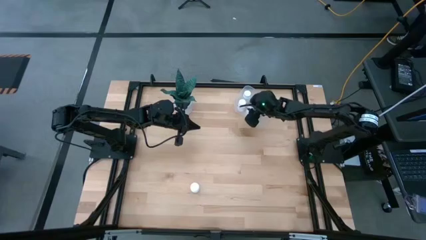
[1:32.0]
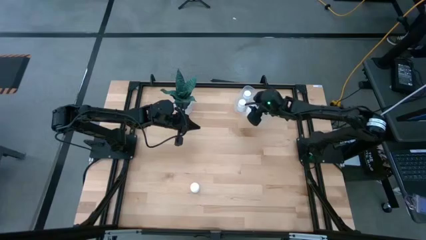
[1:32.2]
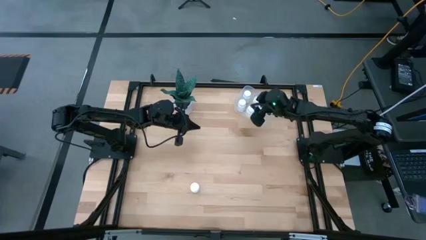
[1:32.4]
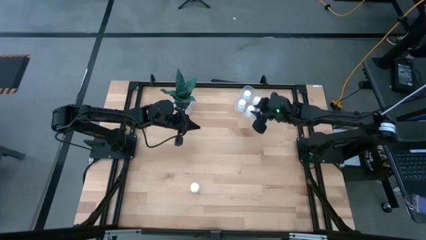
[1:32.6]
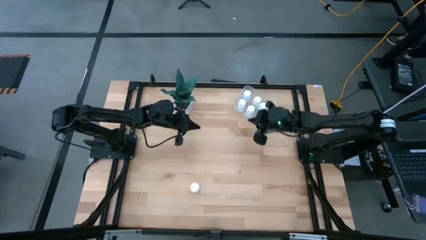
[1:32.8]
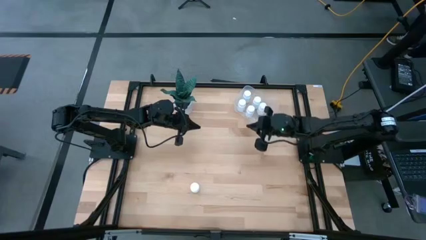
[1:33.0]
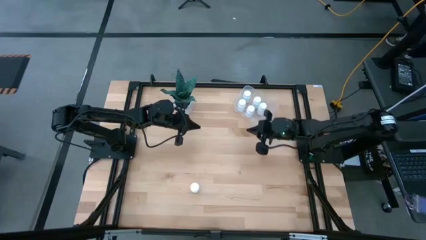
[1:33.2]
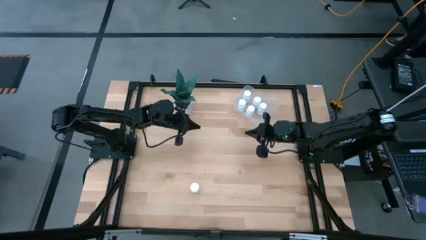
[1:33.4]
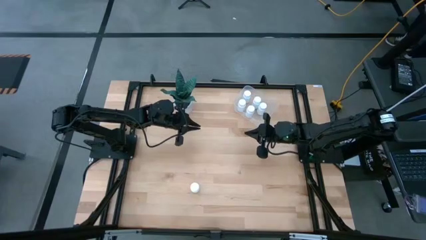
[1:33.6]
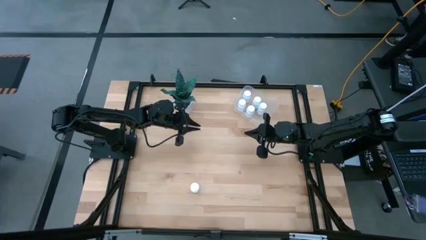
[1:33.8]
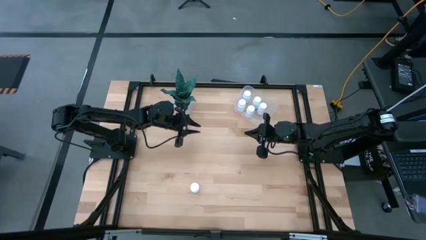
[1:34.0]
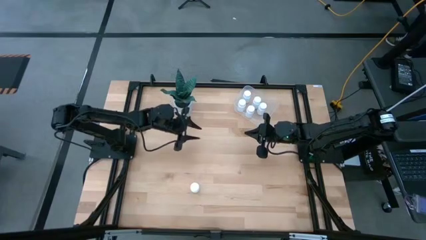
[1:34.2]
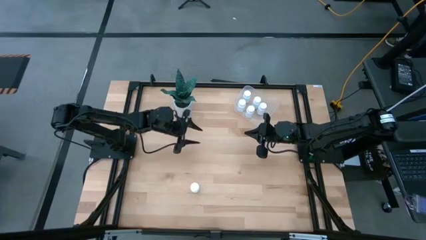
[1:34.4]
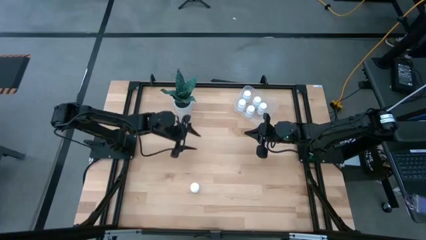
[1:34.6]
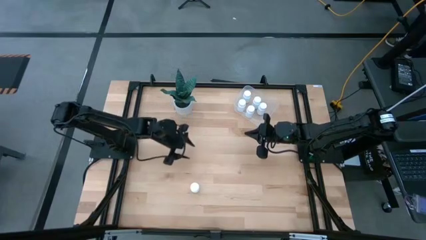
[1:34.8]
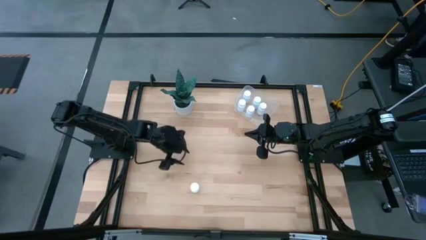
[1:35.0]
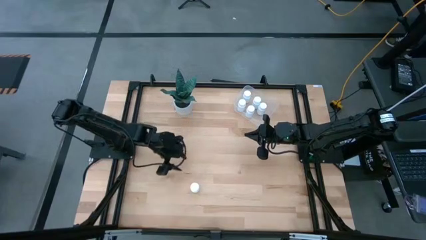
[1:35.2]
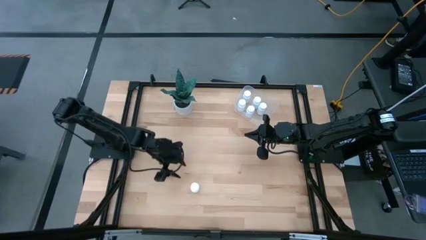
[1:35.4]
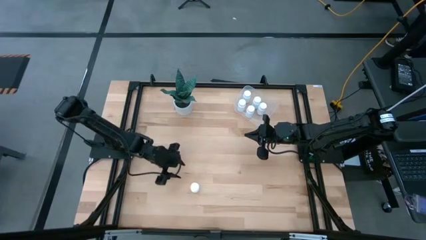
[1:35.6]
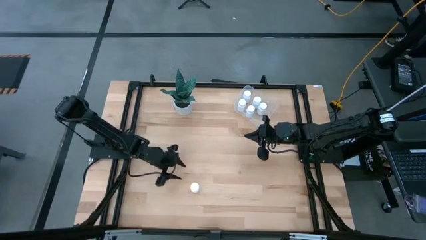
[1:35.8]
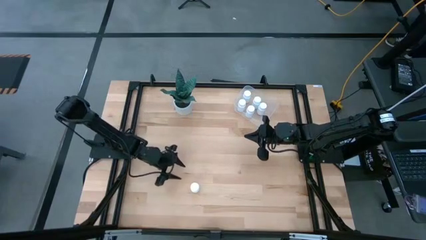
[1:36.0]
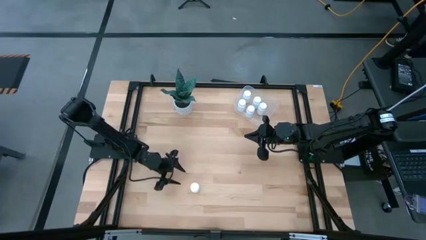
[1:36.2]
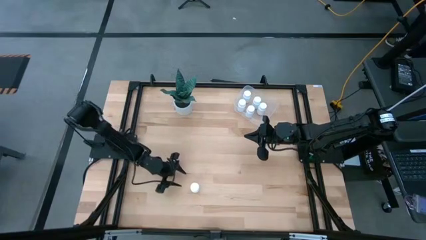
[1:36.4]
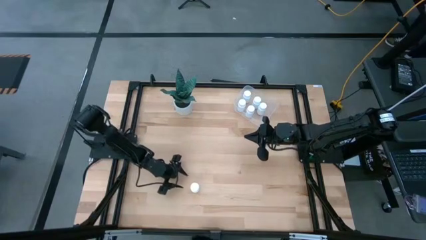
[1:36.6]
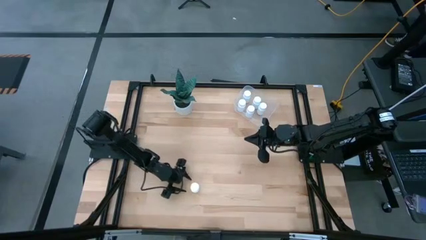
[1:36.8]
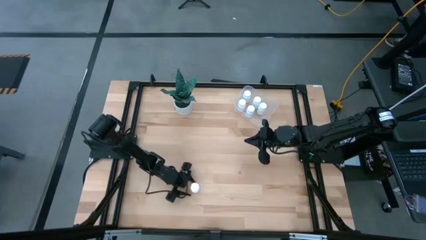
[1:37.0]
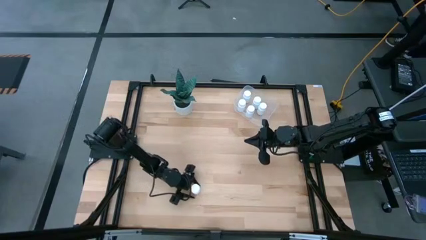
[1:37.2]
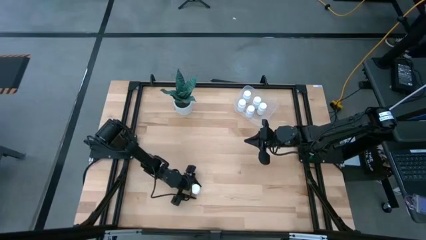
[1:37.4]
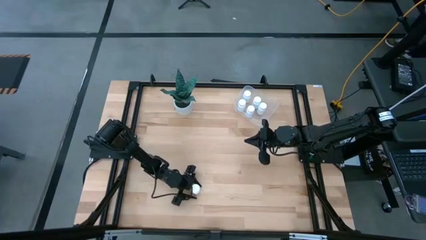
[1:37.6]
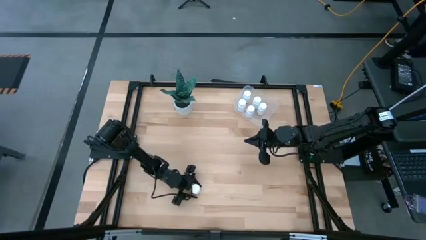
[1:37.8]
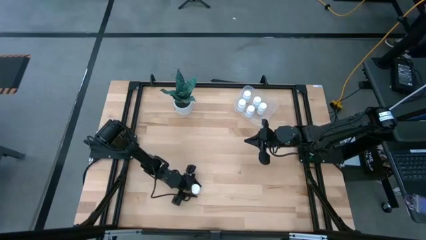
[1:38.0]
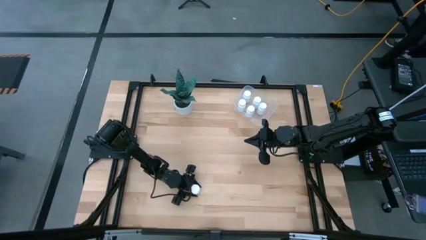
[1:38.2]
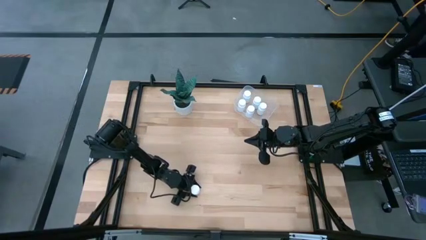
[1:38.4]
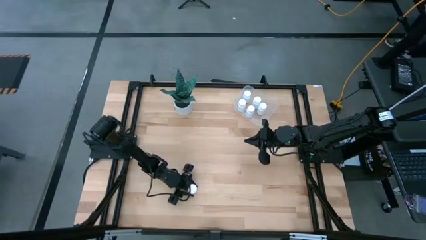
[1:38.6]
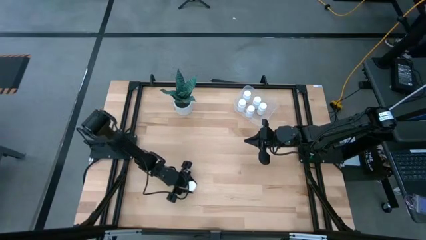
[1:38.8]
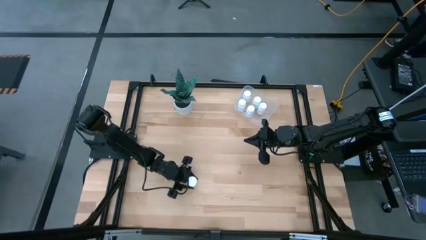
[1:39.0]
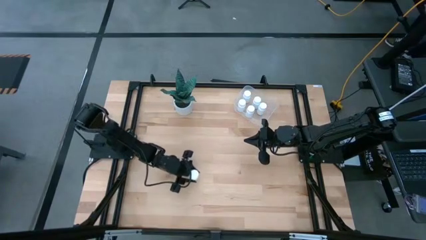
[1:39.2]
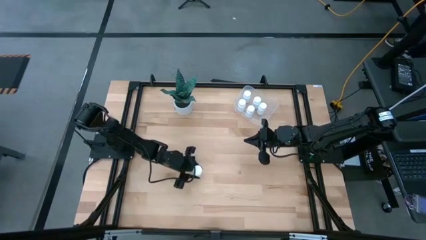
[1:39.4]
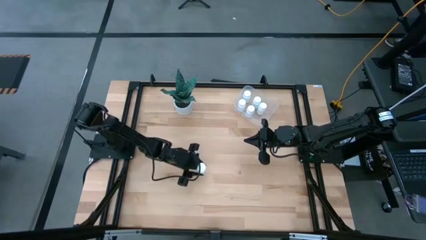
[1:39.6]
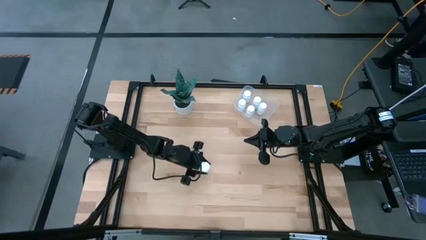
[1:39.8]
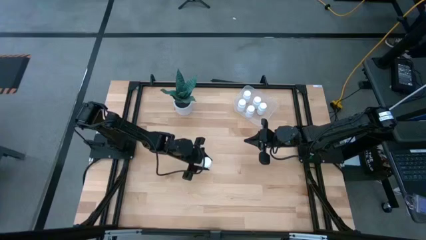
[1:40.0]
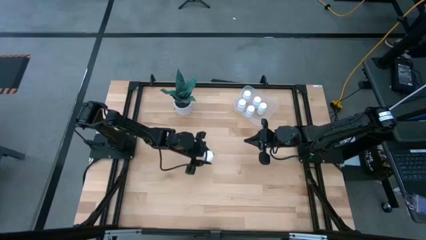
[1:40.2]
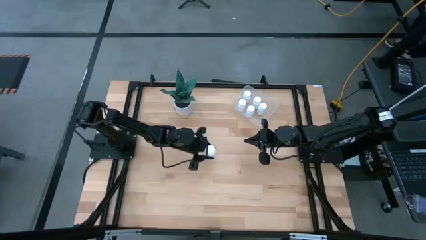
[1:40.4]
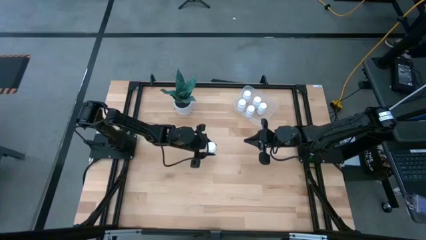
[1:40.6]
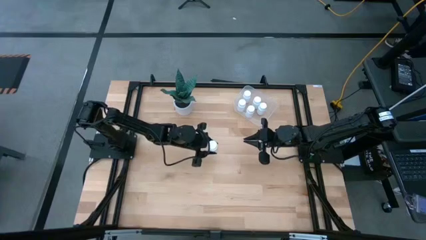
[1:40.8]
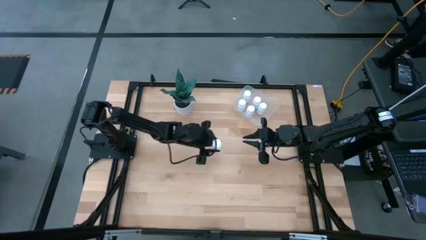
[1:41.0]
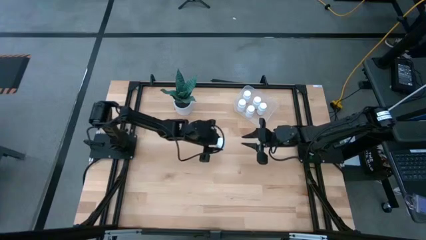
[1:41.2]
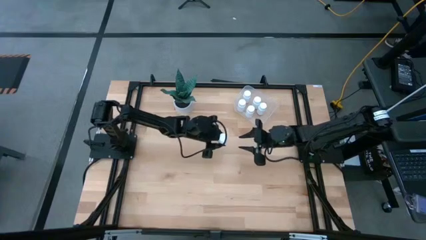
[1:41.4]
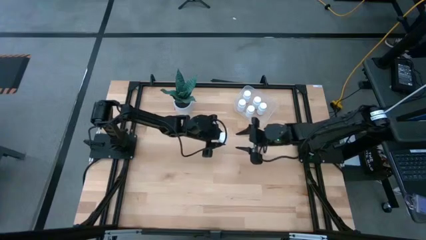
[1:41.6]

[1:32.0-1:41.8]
Task: Pick and place pill bottles into a basket
Put the white pill bottle into the transparent bin

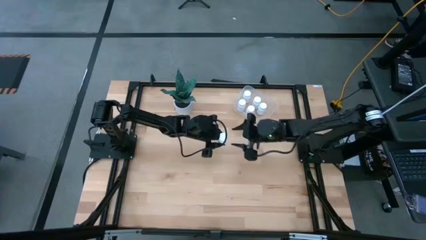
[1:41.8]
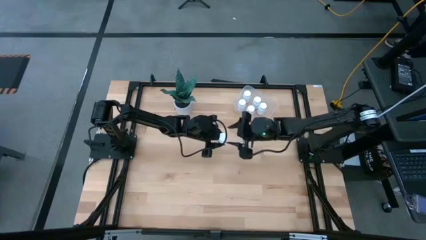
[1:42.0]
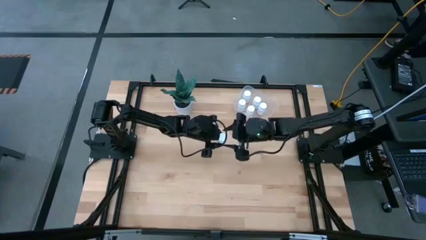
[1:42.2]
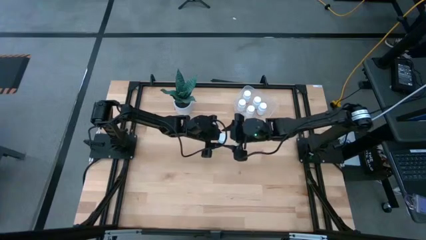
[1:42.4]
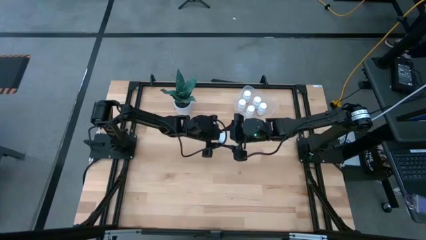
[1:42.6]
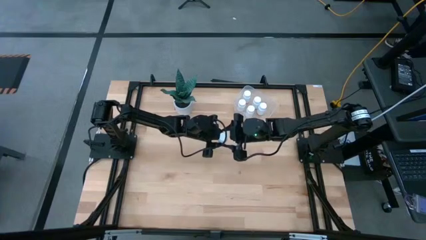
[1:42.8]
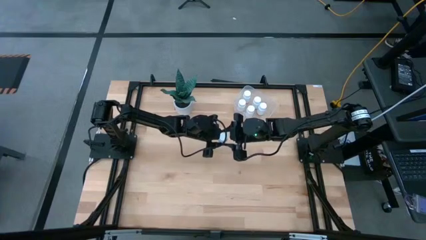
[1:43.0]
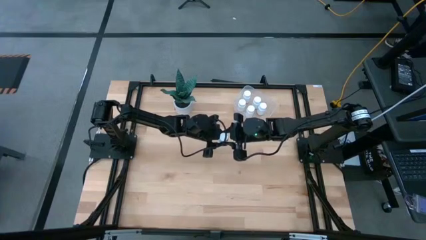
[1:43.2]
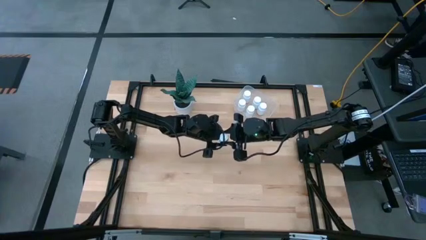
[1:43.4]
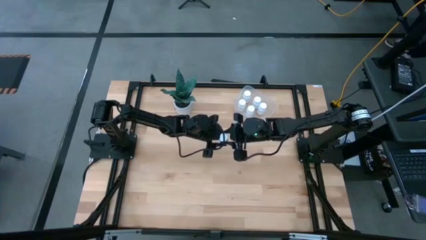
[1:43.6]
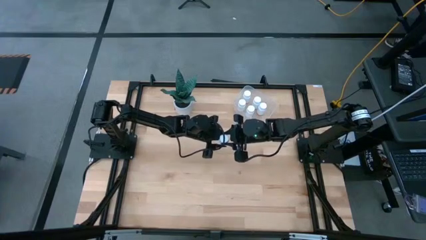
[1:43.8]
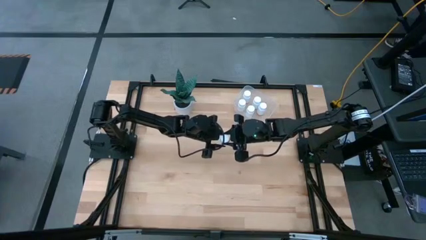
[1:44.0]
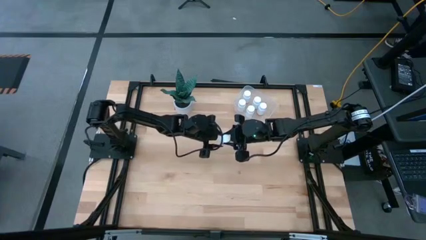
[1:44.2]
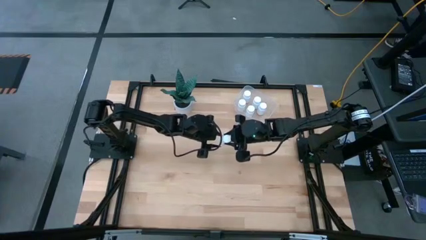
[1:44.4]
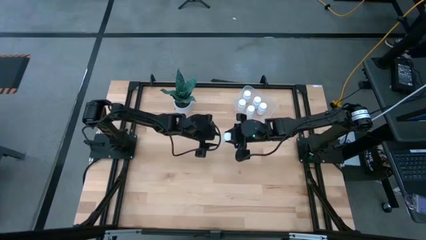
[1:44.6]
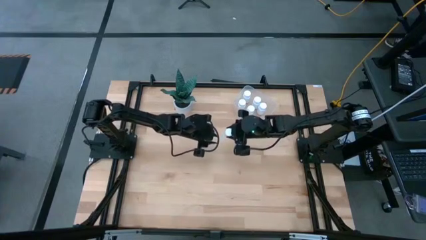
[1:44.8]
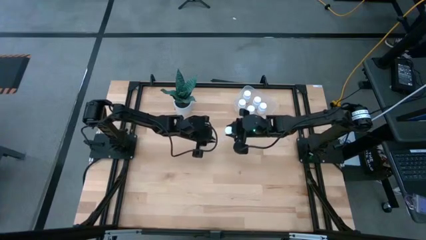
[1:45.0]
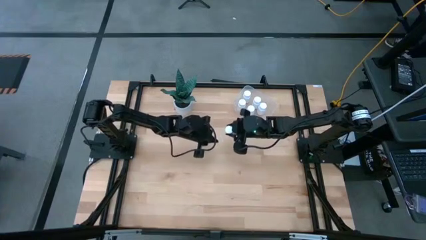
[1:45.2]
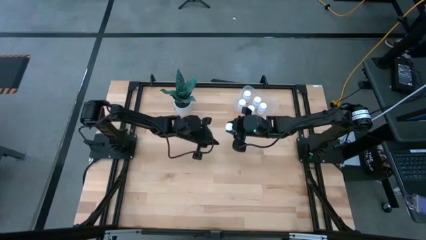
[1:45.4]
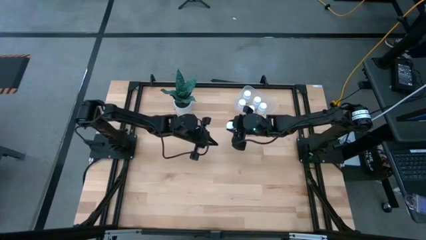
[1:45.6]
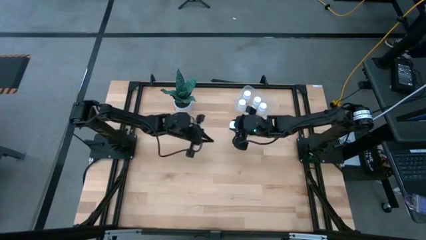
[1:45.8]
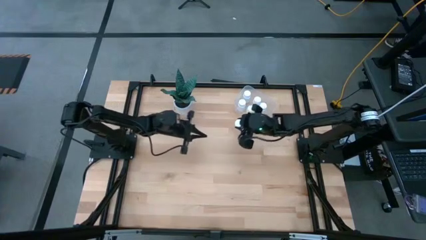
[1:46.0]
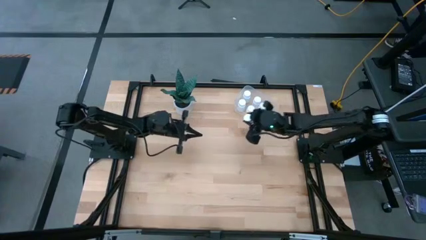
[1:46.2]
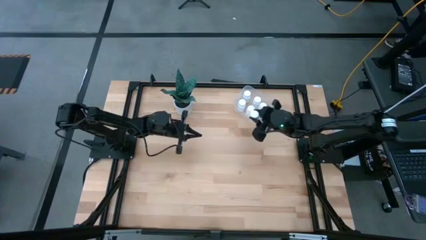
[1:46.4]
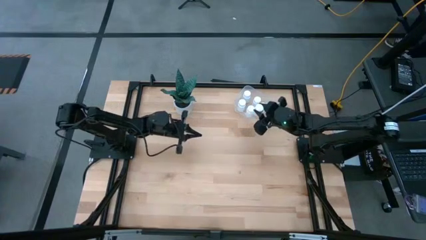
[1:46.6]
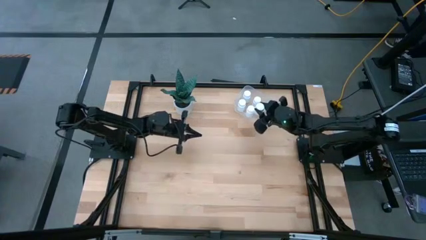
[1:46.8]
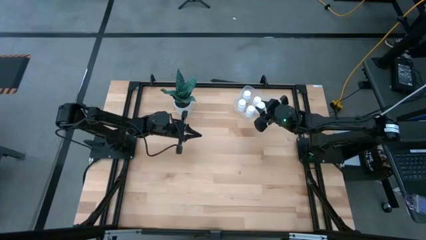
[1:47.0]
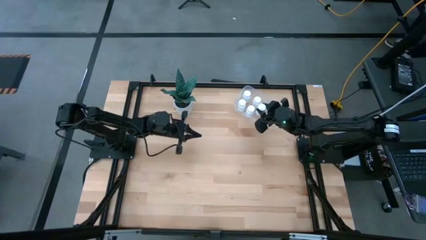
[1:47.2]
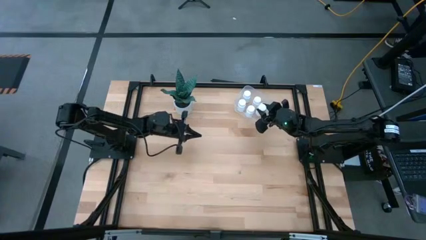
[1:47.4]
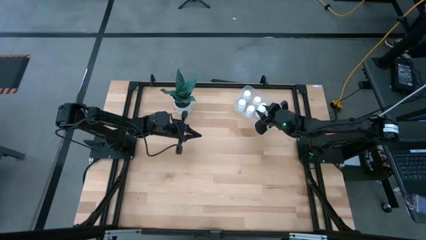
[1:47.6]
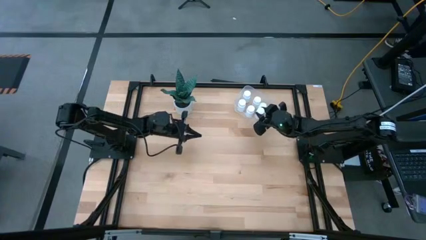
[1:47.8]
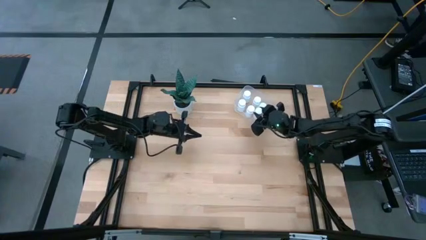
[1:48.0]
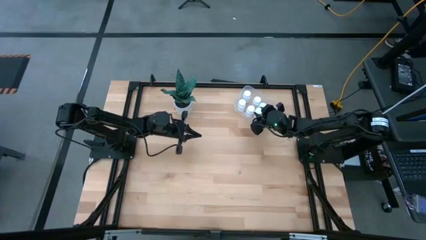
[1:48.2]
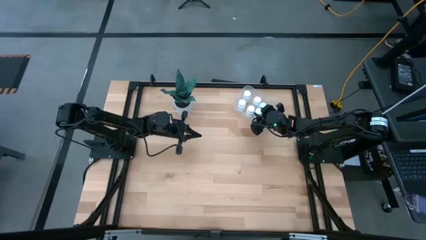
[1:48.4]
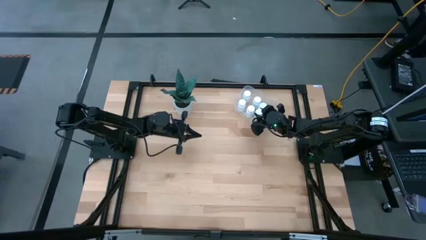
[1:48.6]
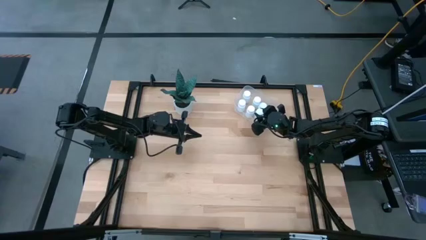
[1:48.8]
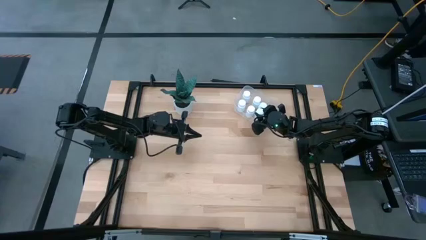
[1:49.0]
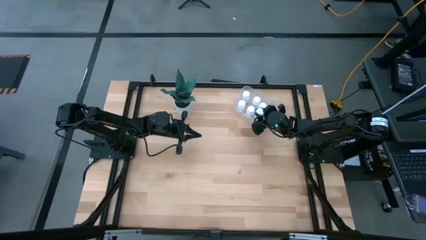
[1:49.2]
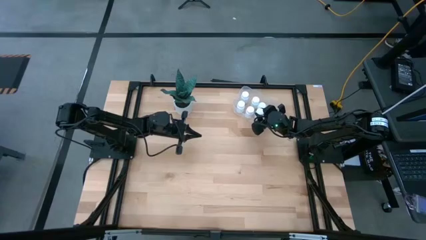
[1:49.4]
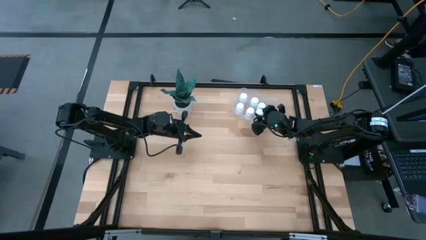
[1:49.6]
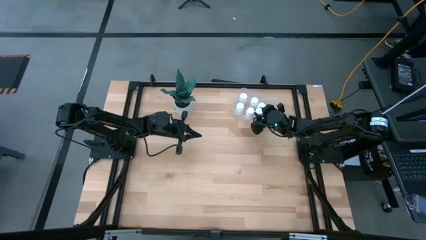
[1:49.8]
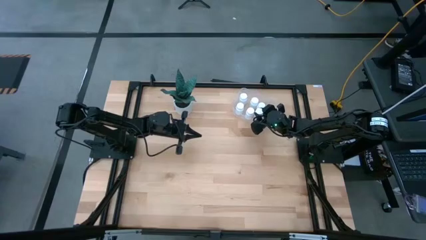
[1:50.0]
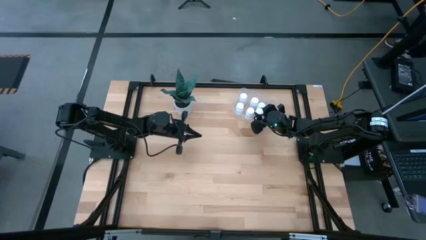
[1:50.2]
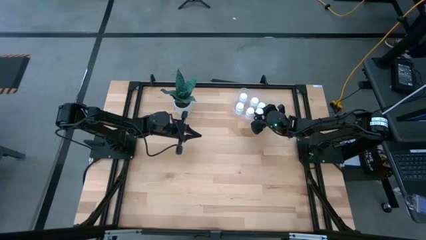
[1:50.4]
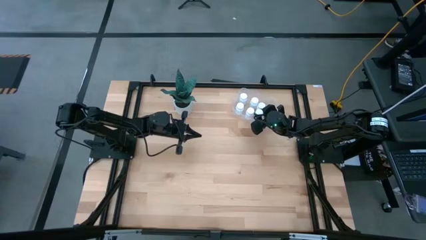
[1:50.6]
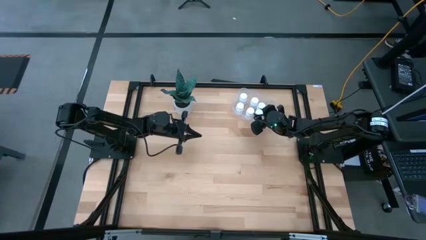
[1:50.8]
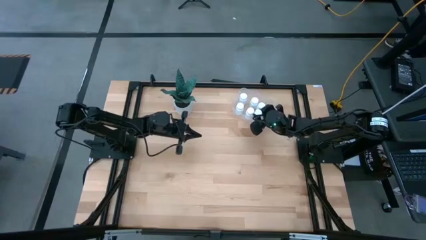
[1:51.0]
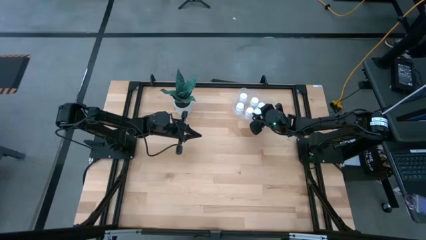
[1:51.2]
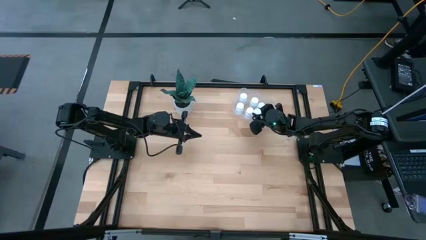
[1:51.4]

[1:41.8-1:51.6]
Put the white pill bottle into the transparent bin
